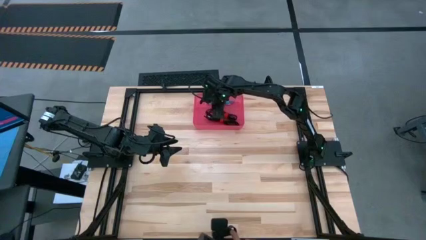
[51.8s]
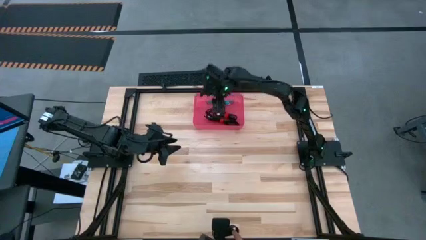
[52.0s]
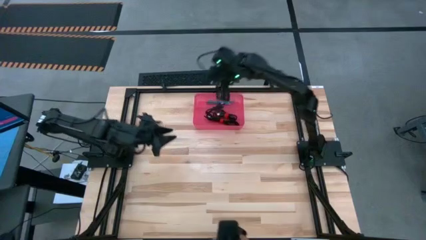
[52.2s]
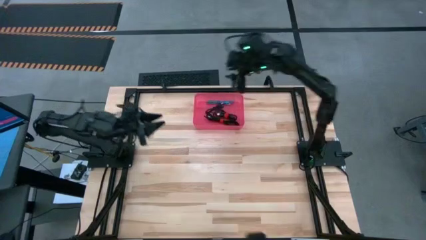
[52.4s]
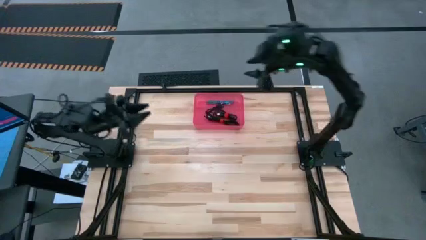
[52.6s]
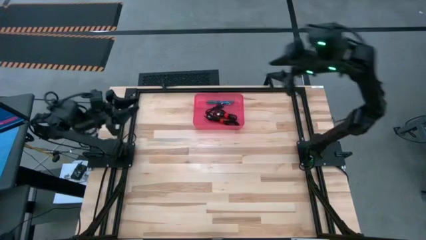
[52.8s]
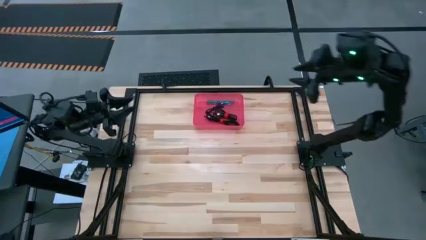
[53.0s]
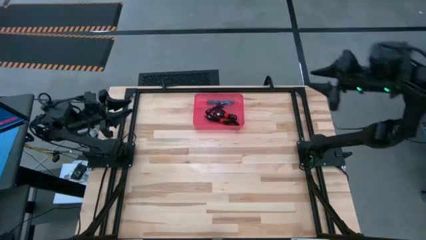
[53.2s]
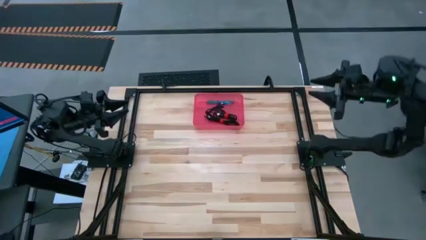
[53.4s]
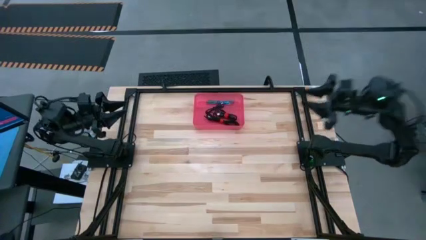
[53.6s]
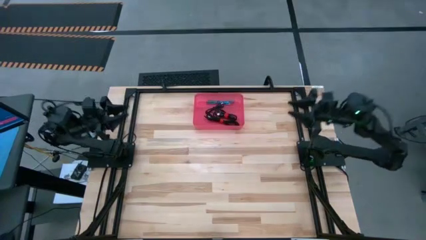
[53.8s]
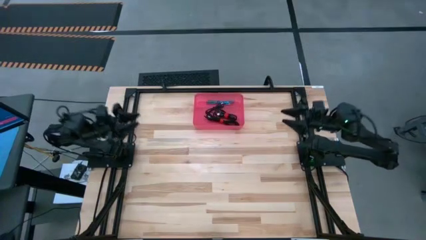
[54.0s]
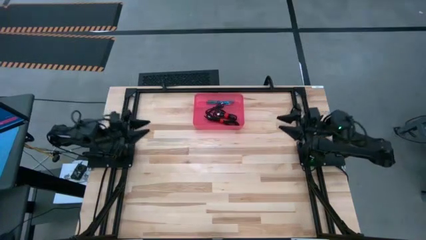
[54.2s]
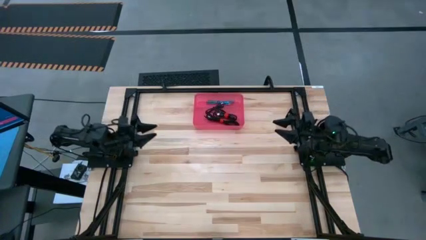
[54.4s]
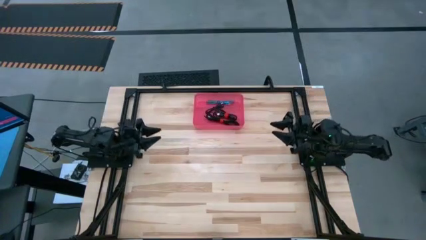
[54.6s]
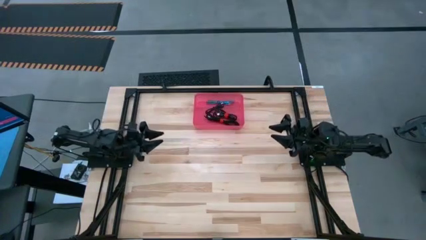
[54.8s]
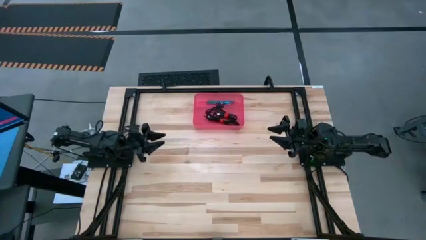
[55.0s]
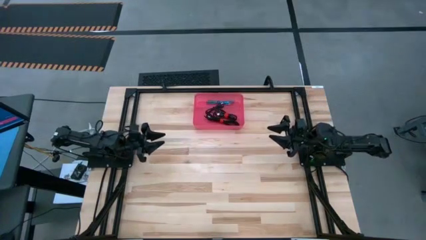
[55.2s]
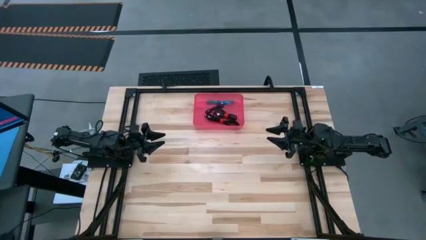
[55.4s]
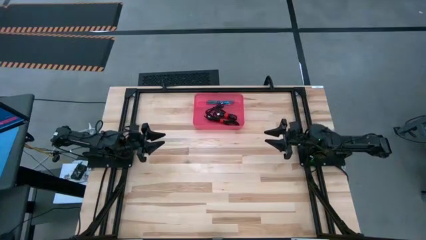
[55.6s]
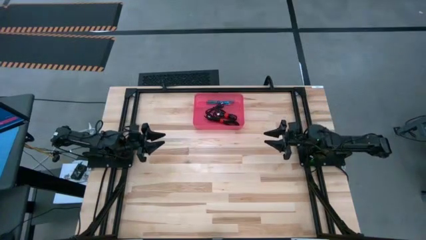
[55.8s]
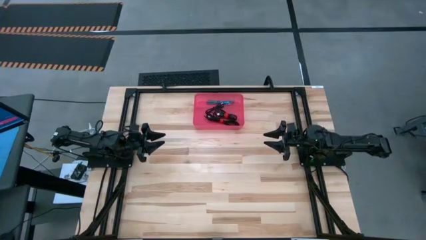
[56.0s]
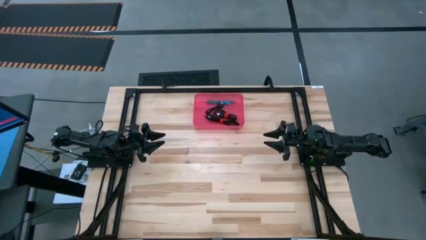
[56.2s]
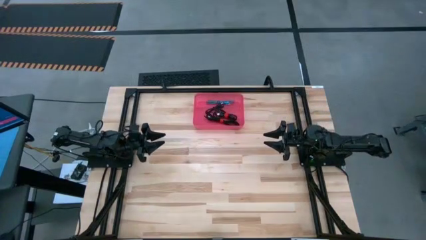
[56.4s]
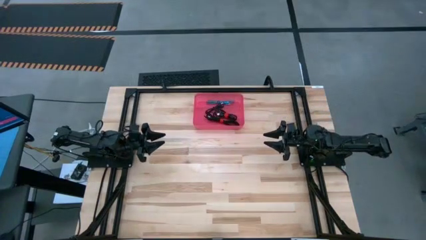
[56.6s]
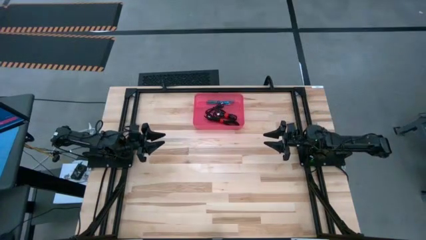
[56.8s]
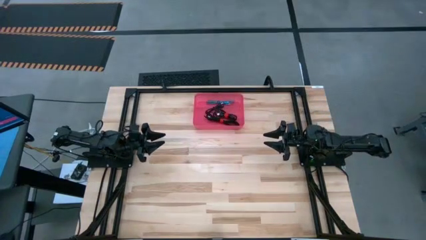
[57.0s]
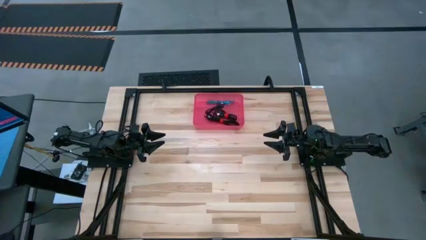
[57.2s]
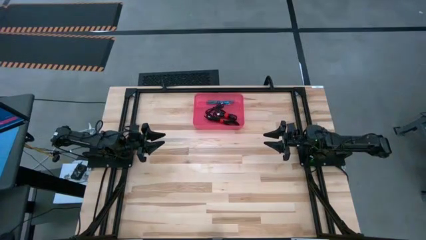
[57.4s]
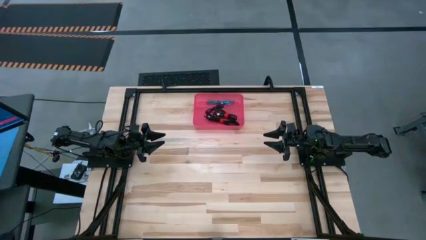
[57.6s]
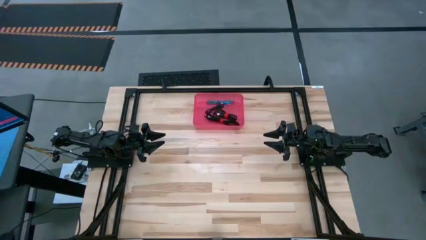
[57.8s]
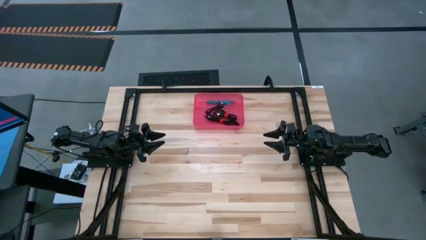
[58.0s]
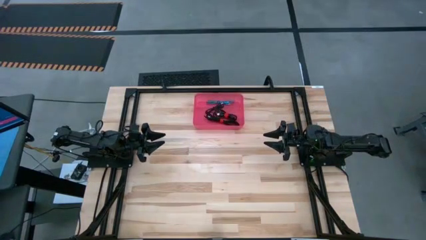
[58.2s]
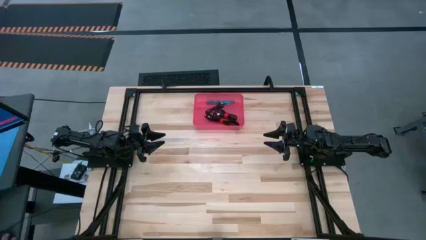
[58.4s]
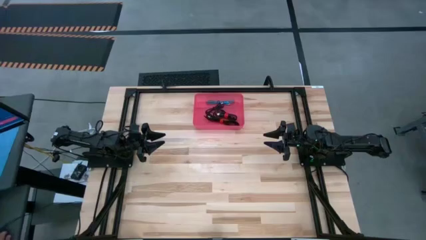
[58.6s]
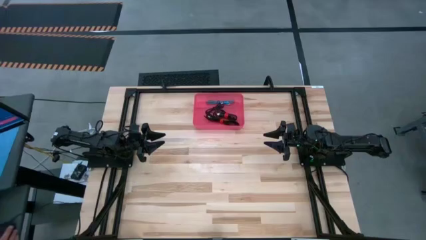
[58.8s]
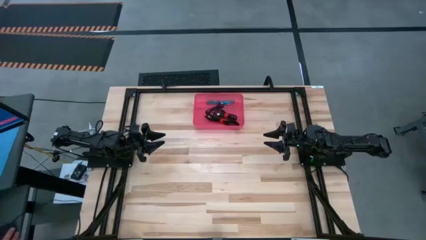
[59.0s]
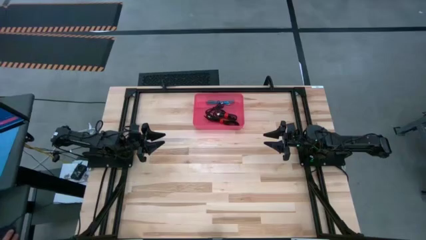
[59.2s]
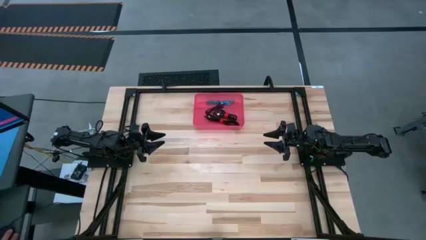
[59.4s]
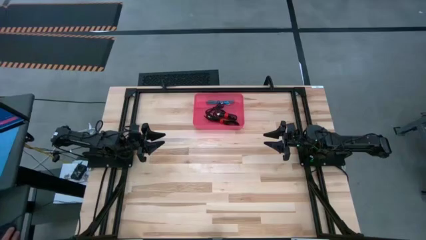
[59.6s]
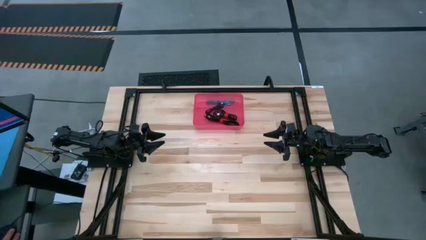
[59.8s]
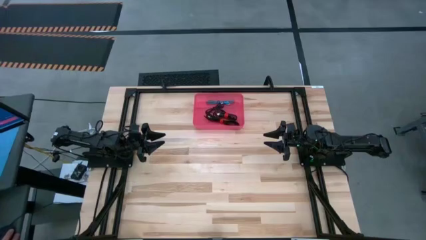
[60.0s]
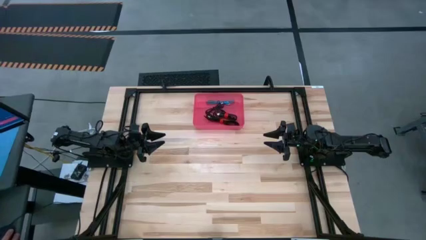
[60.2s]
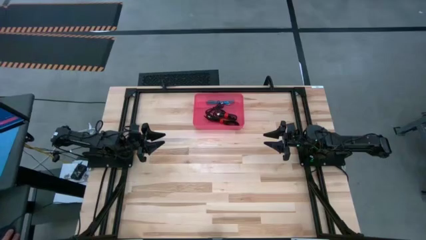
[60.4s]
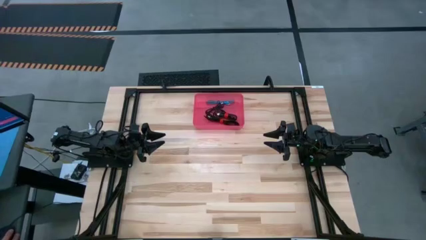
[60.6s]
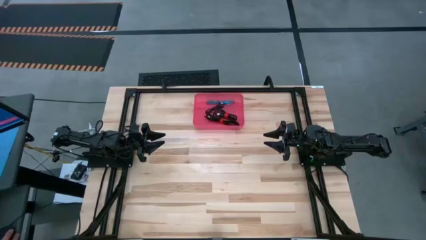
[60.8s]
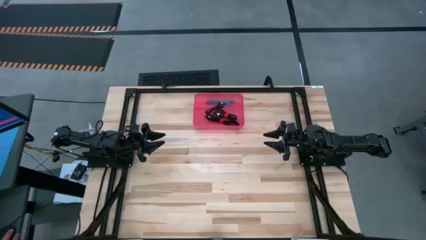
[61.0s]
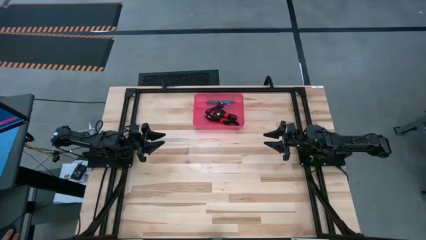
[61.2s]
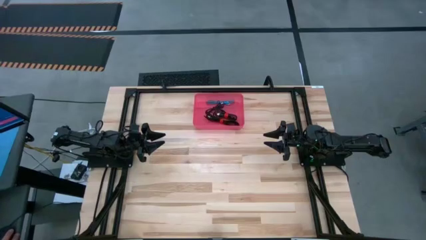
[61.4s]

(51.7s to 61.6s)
Task: Pick and place USB-C Cables
Return to Home Position

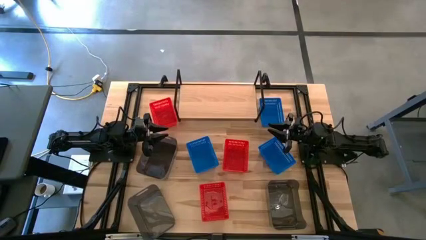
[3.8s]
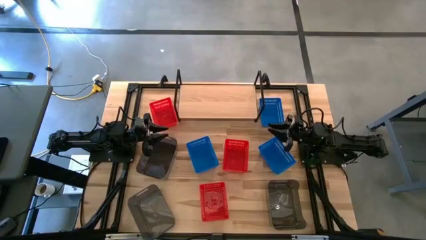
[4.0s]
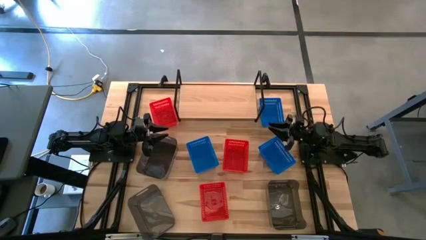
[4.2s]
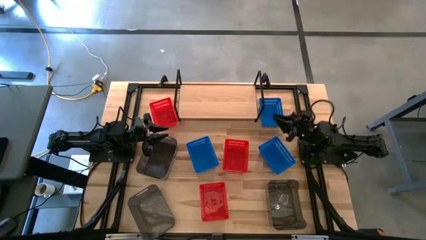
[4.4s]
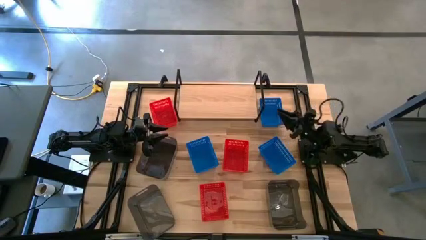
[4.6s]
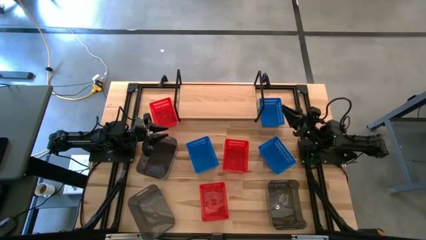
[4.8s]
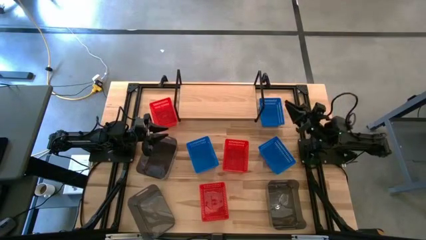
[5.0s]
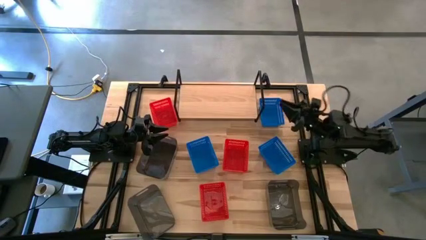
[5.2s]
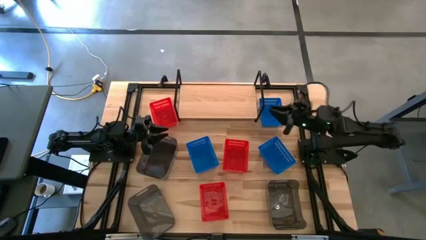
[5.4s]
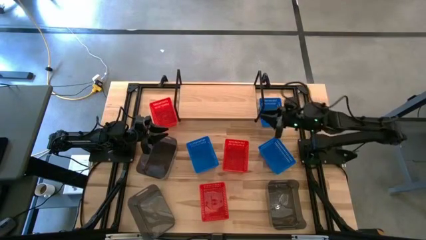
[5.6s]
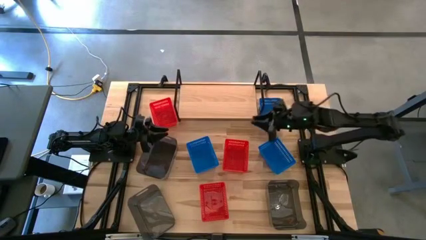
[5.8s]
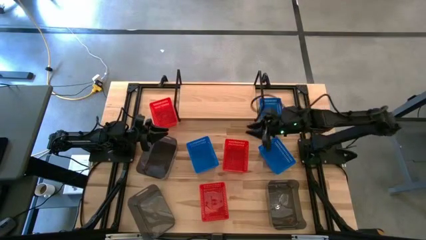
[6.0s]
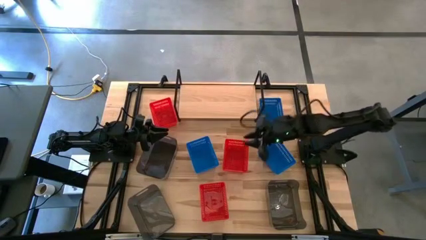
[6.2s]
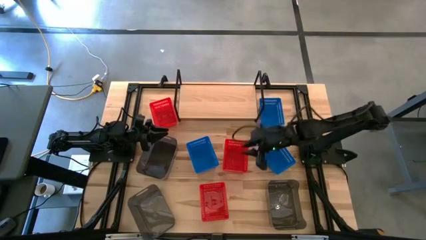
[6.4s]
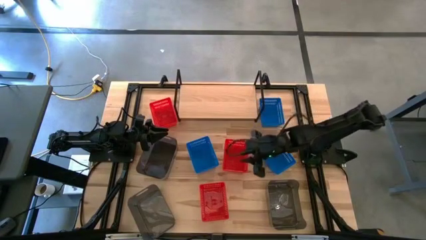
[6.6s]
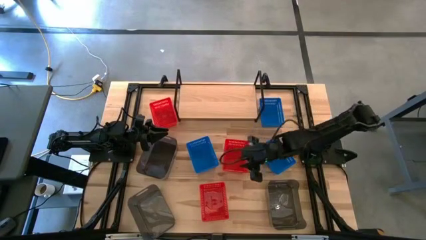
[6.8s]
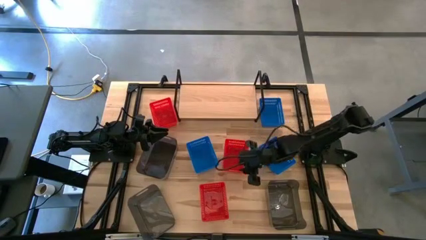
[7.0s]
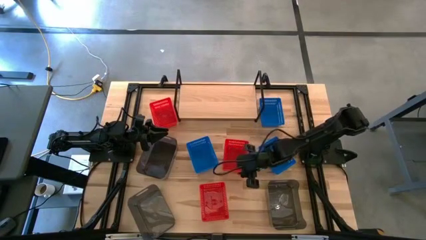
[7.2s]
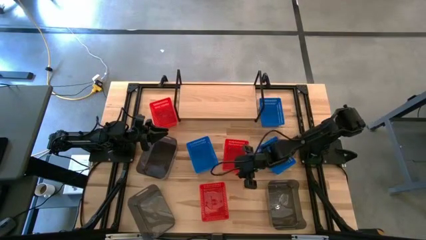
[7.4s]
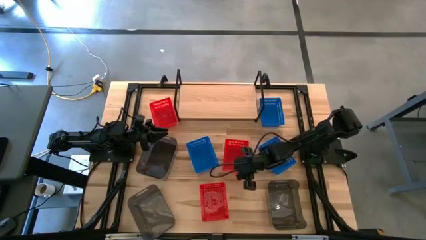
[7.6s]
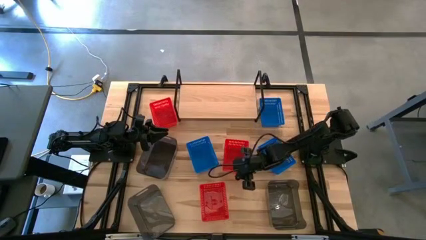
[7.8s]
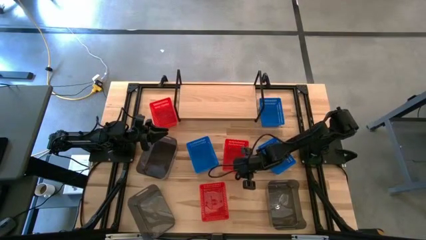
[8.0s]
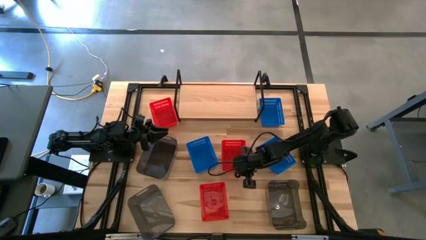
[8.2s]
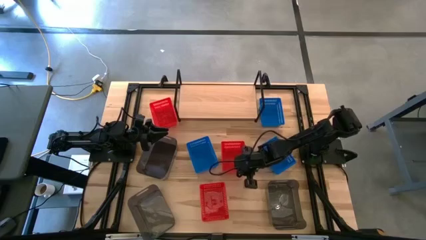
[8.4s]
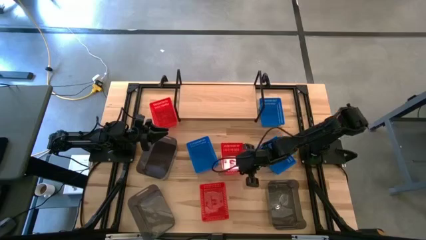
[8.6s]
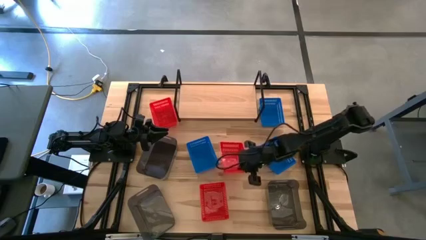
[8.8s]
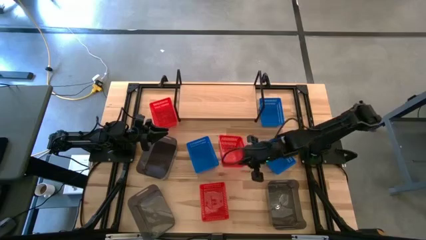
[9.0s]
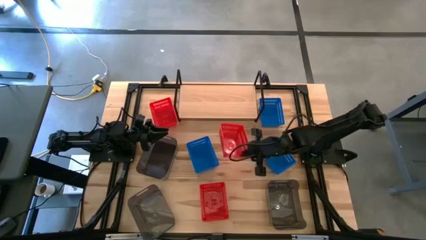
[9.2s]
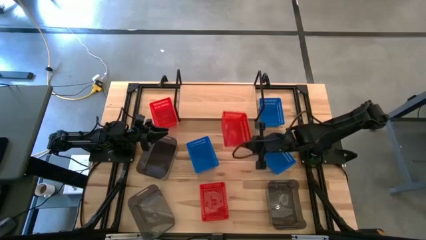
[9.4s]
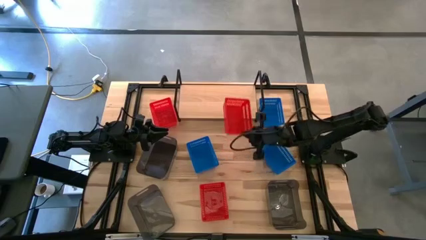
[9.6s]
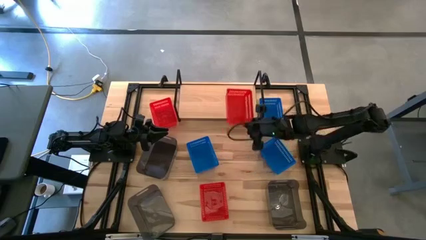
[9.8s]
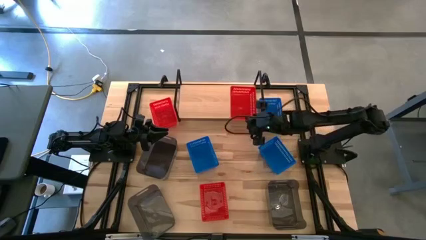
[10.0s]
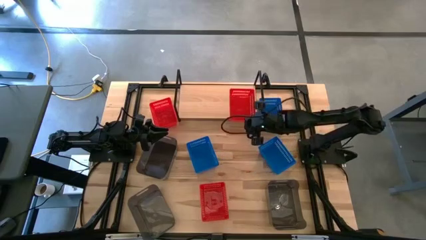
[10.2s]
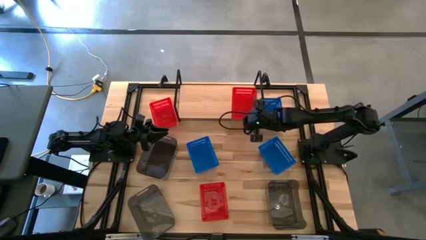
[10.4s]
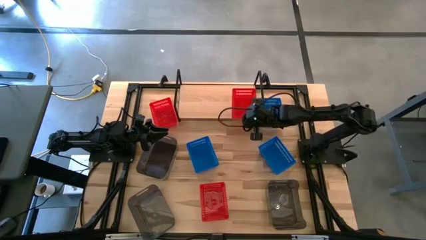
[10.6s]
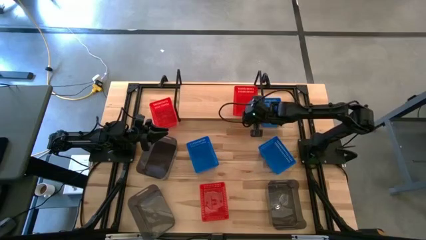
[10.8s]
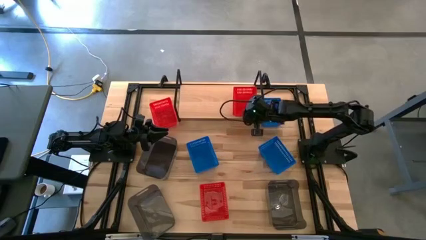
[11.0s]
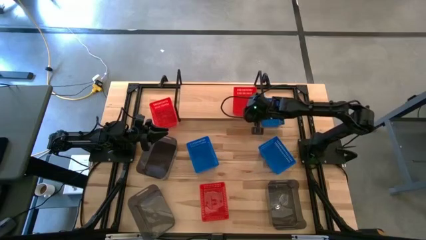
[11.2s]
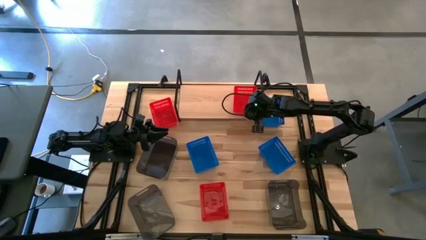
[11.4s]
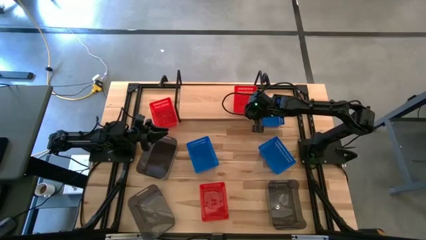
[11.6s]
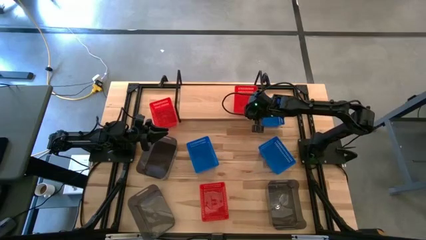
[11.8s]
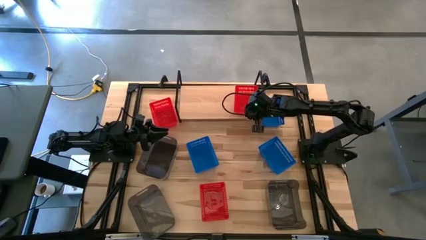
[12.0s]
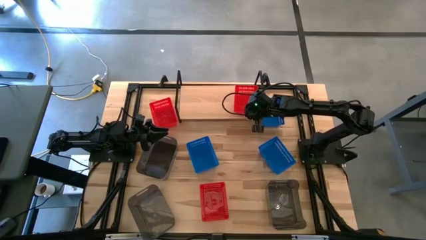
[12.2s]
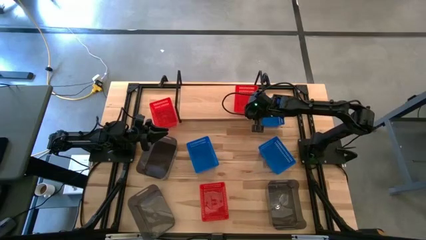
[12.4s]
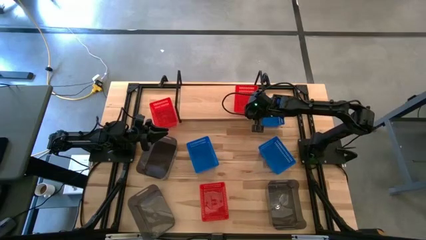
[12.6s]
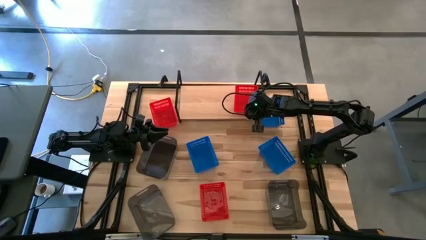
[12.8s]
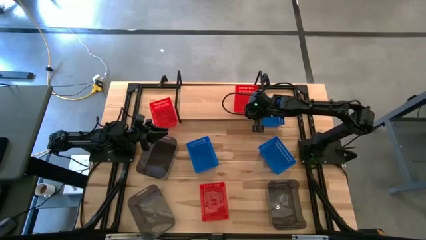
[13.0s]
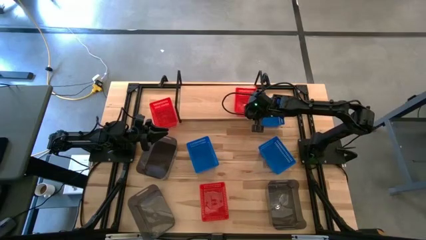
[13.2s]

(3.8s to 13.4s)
Task: Stack baskets on shelf by color
Put the middle right red bin on the shelf
